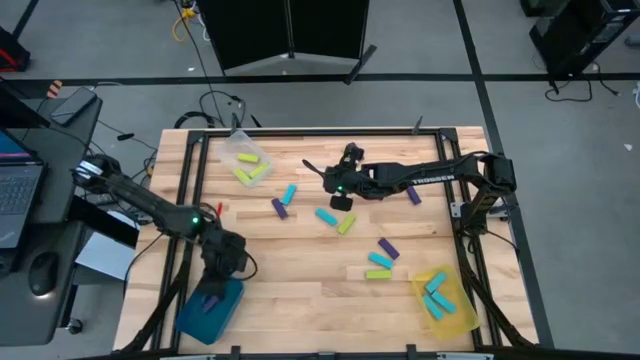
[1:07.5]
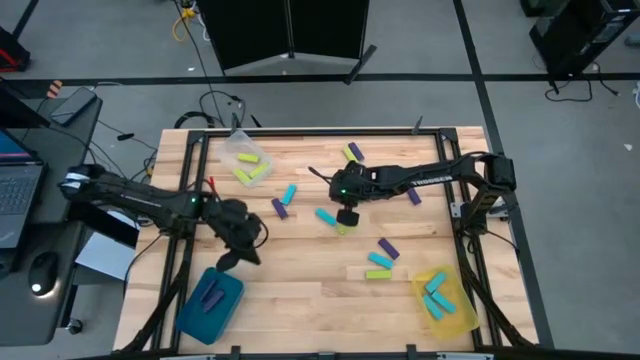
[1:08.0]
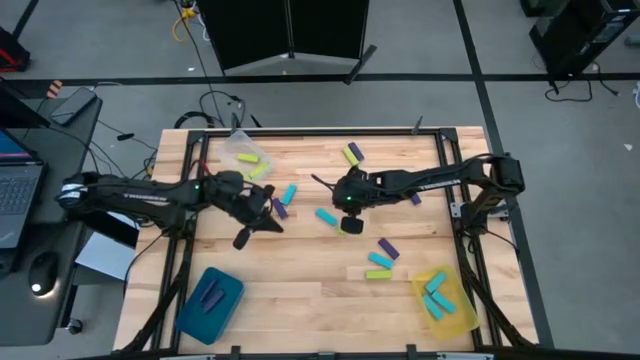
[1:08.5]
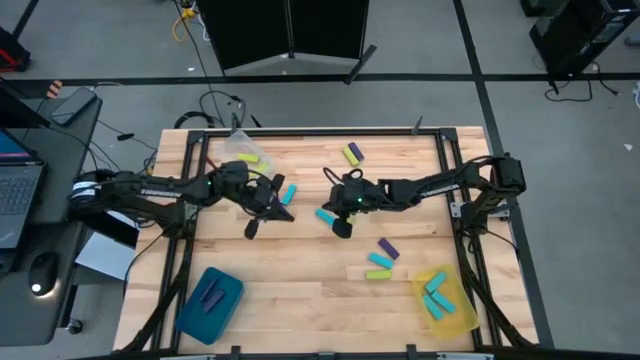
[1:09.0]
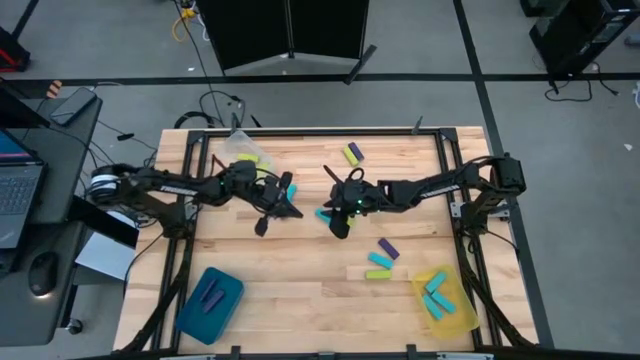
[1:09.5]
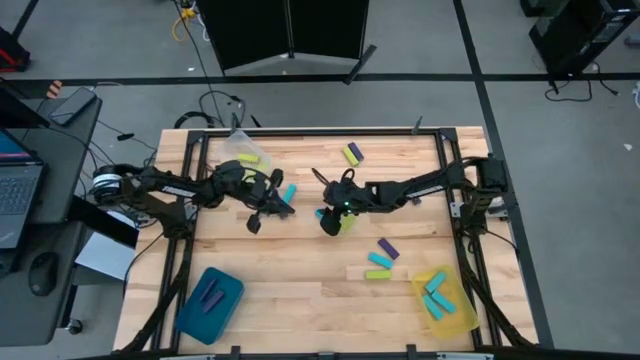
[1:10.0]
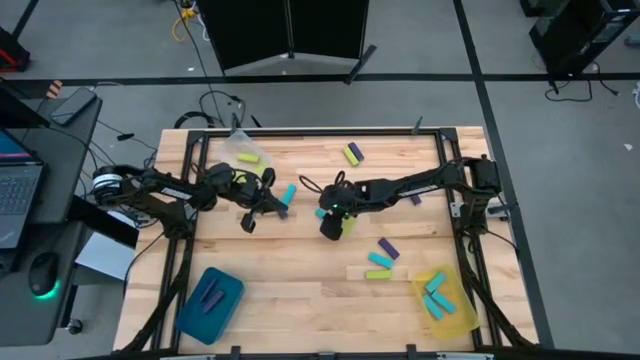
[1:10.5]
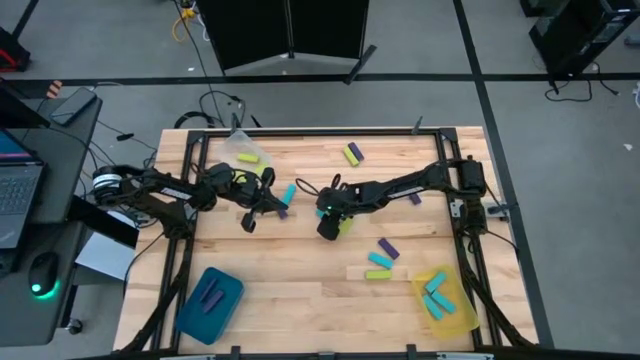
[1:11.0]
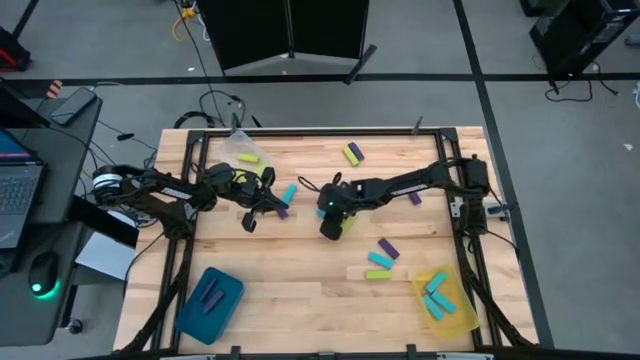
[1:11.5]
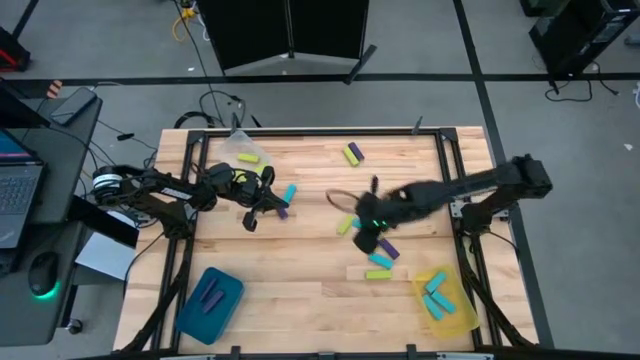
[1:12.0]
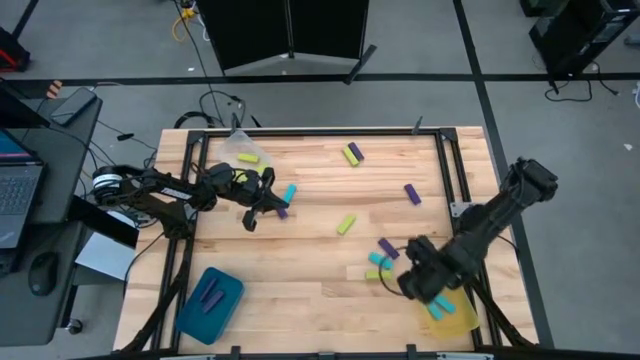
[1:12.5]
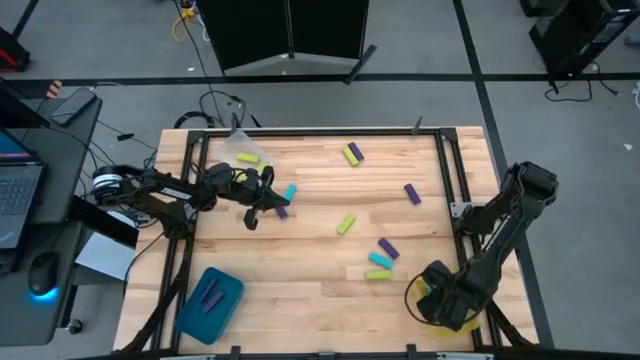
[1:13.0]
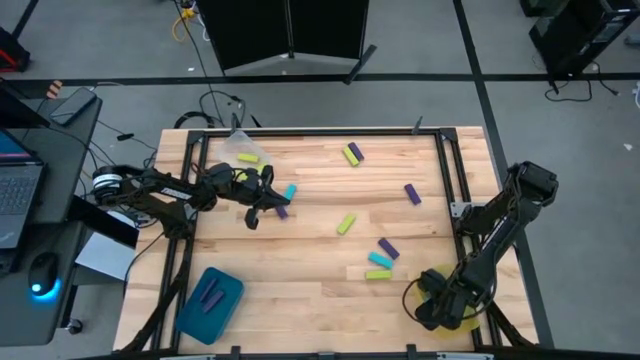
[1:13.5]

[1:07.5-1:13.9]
Task: Sort blocks
Put the blue block into the yellow bin

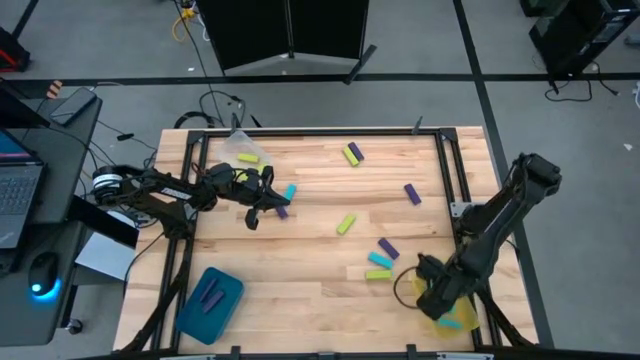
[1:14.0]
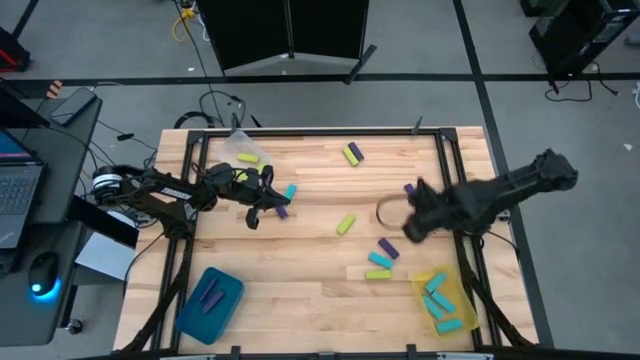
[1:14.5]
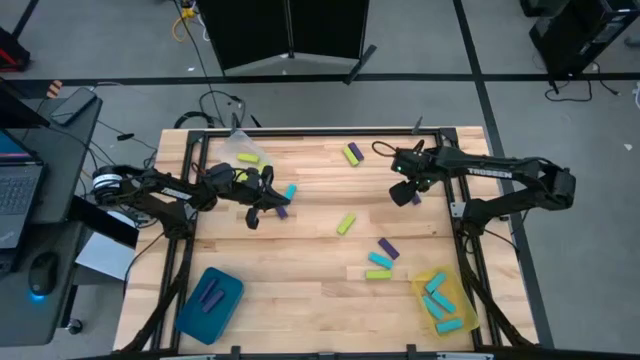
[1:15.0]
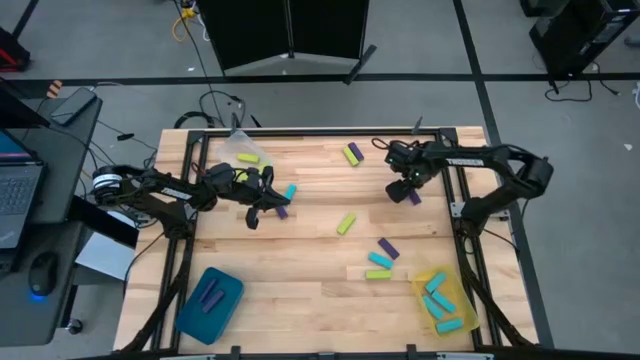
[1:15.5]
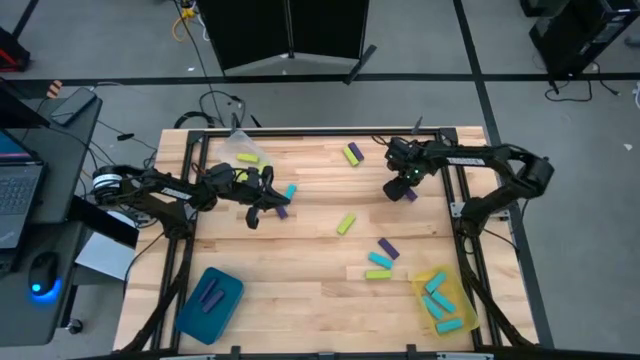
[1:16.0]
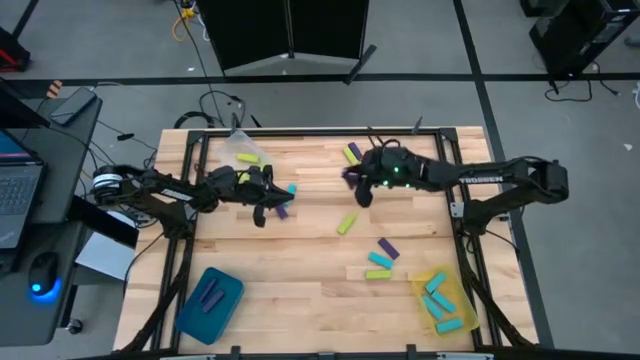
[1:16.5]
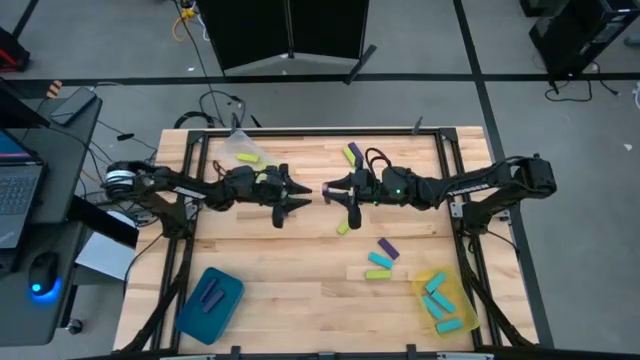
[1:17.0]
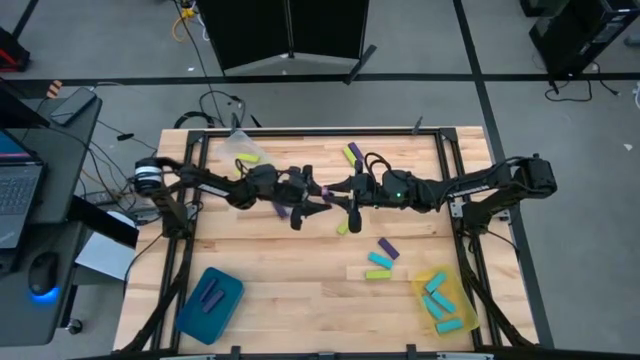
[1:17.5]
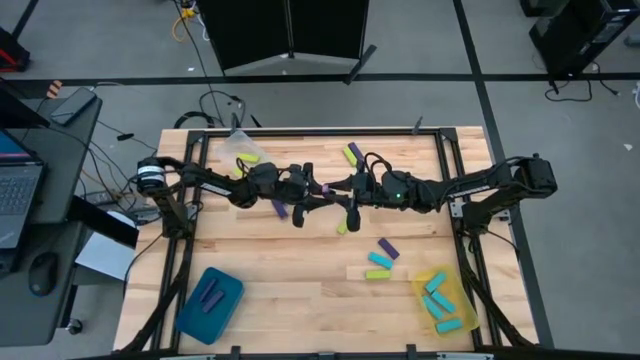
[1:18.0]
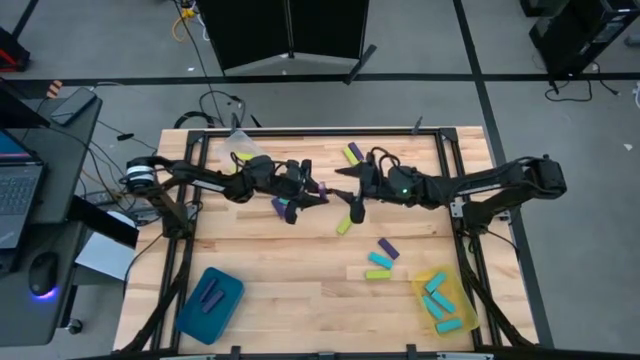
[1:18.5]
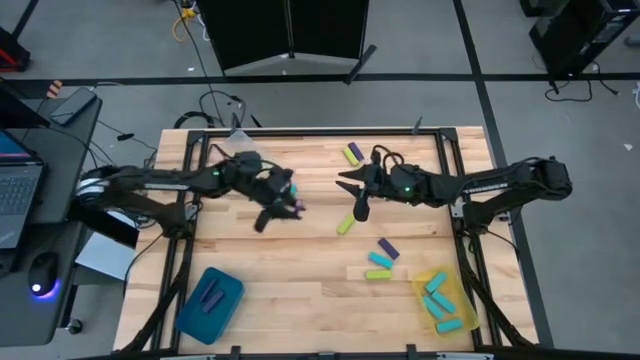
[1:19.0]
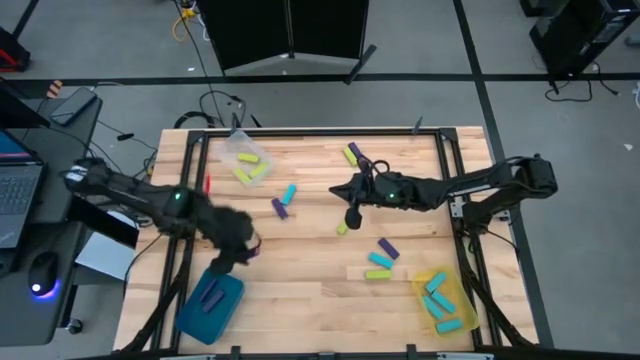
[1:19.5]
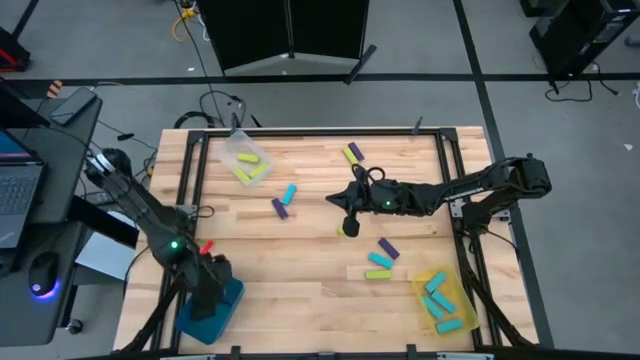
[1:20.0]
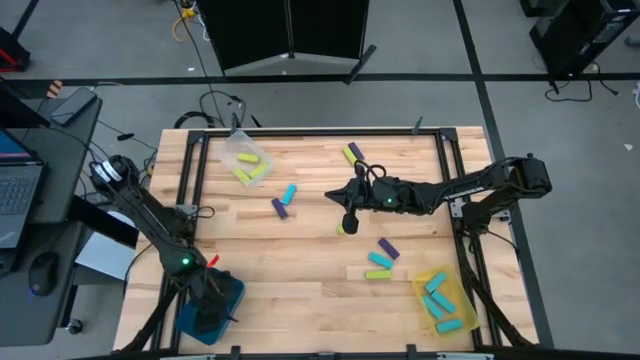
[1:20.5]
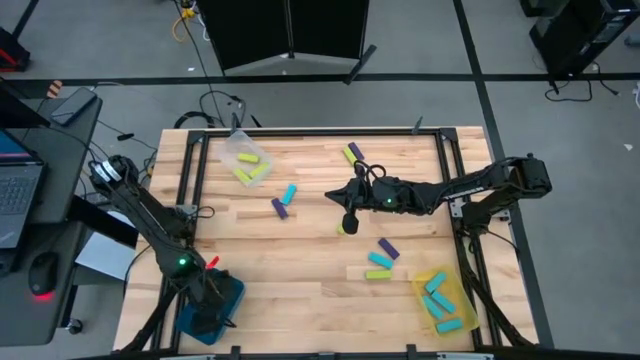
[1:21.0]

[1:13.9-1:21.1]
Put the purple block into the blue bin

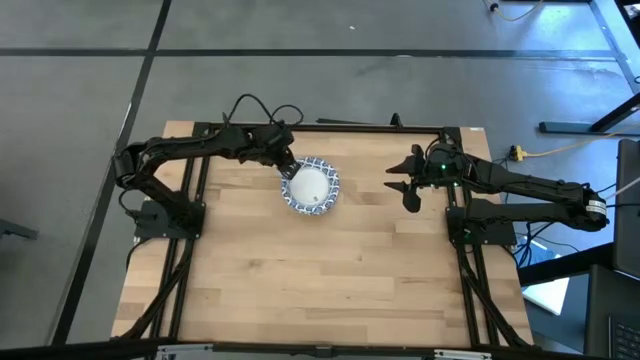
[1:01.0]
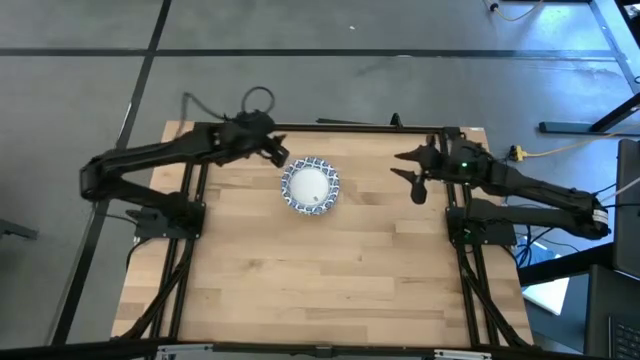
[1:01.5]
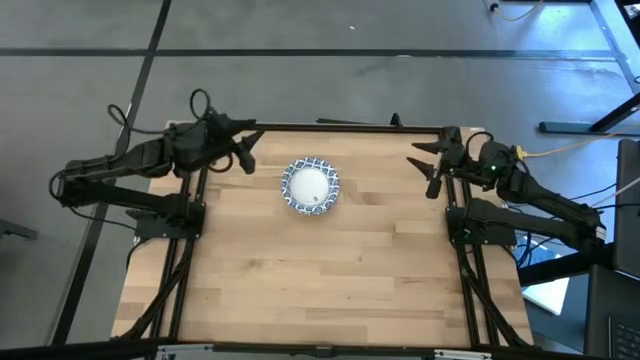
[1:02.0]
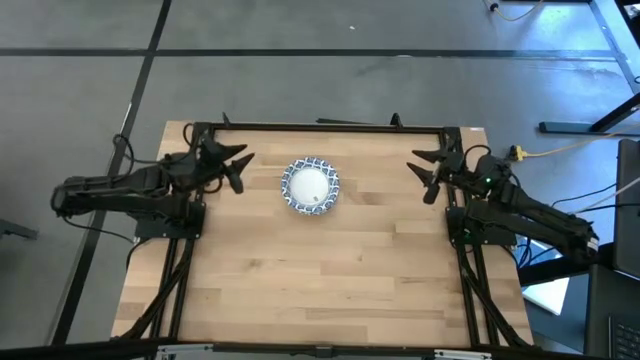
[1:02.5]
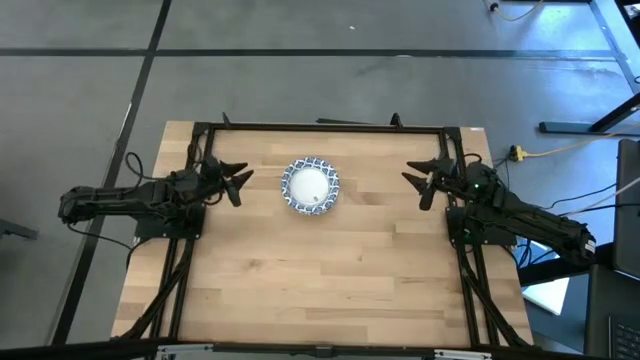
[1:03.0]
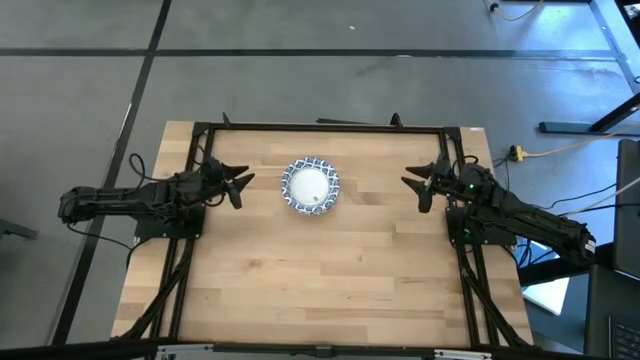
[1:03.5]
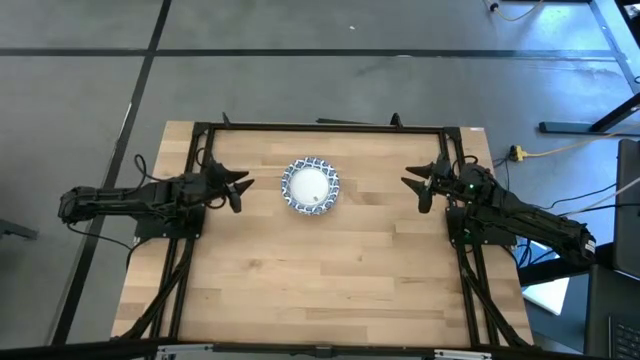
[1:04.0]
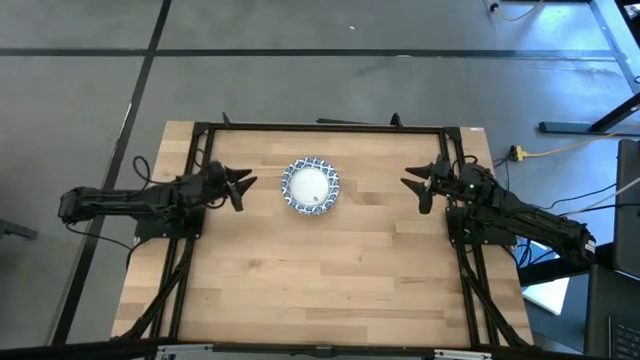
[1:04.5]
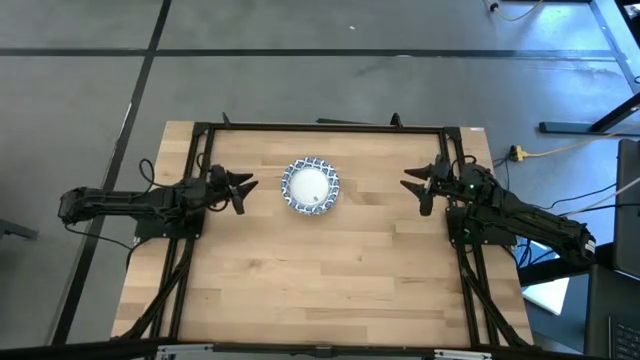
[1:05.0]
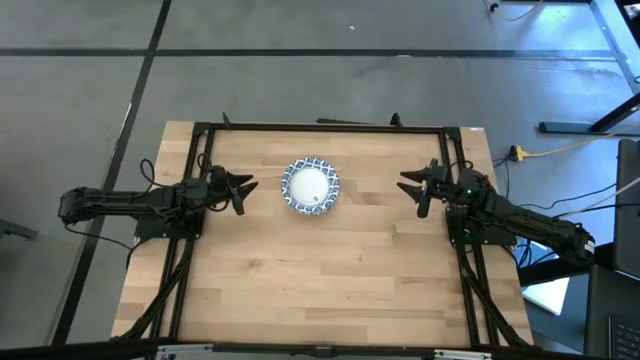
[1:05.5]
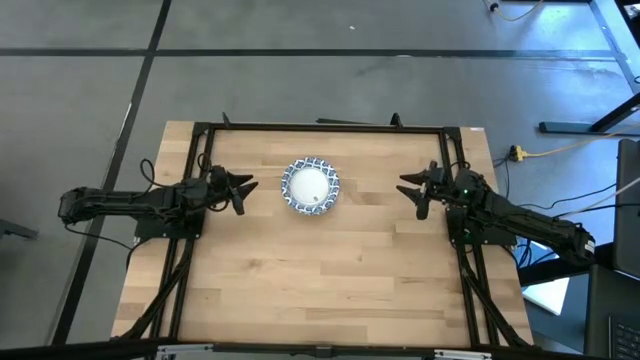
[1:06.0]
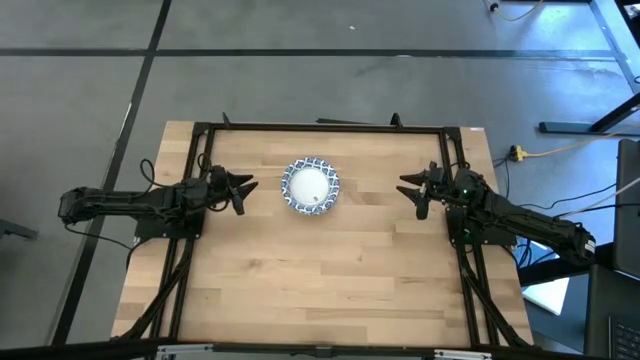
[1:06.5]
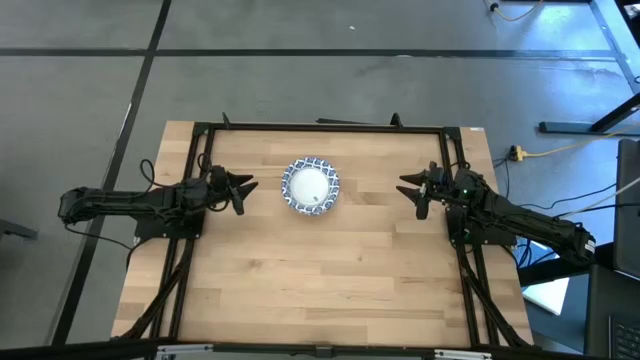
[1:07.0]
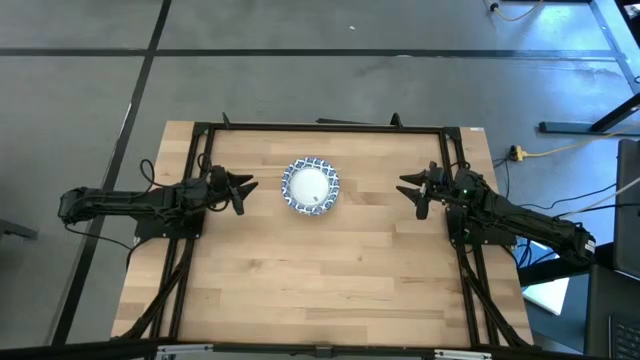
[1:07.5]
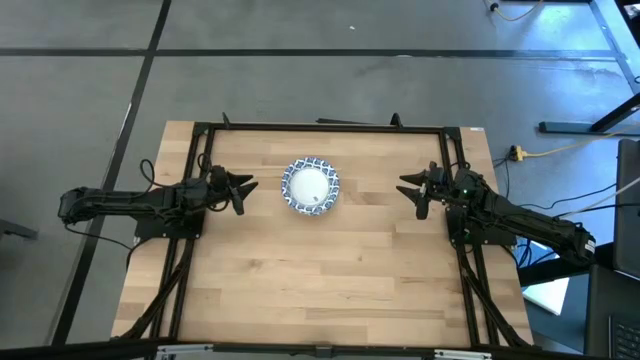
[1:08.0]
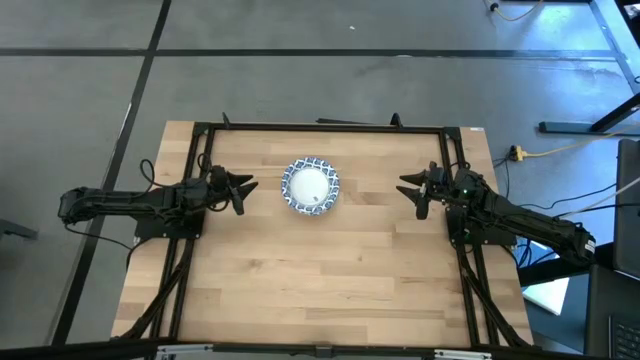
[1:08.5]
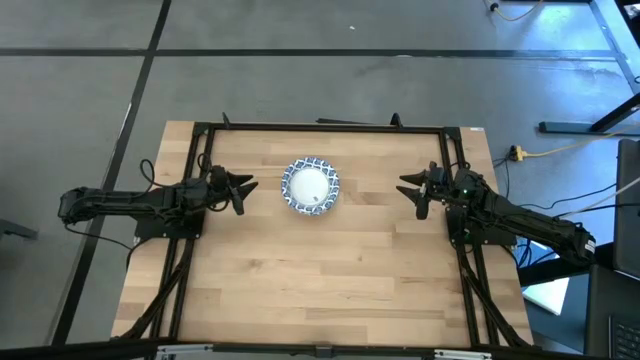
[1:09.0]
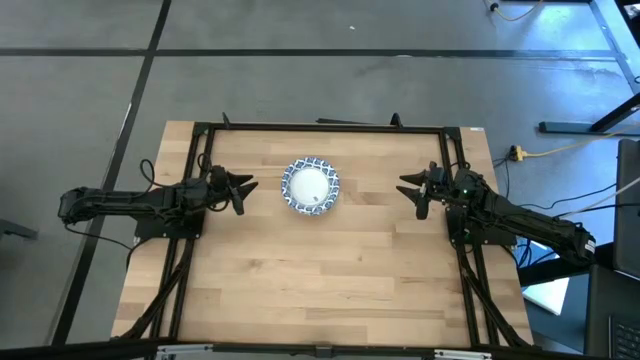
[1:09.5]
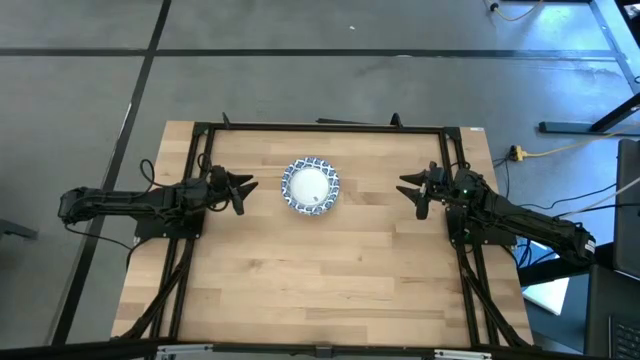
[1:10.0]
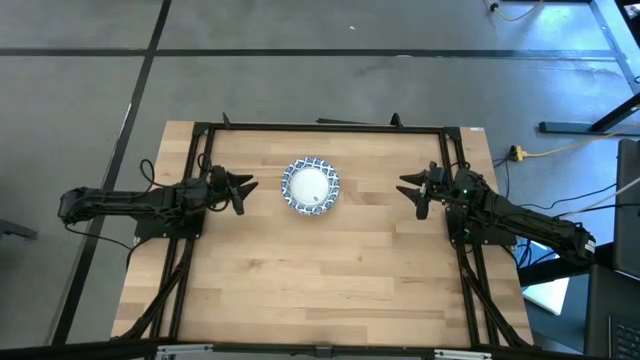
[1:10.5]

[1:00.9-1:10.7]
Task: Nest bowls inside each other
Return to Home Position
